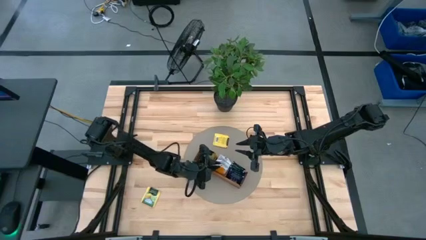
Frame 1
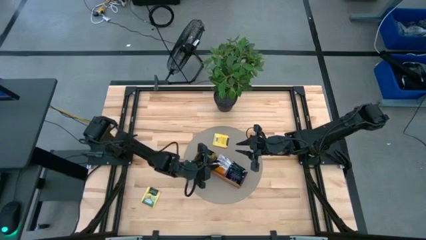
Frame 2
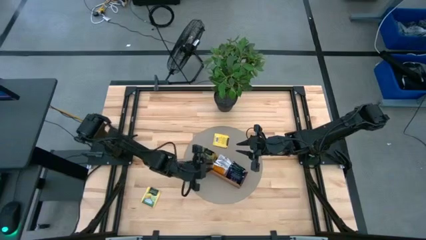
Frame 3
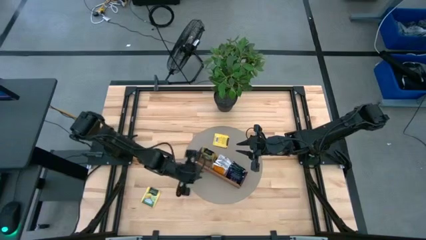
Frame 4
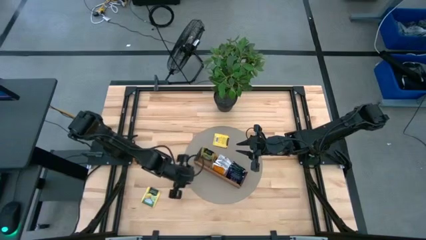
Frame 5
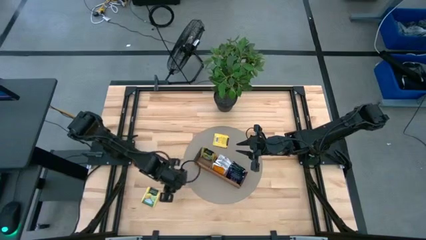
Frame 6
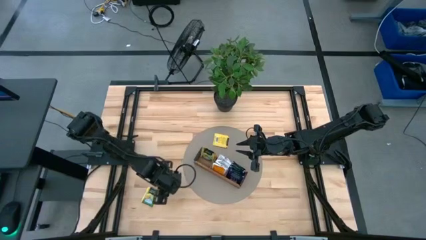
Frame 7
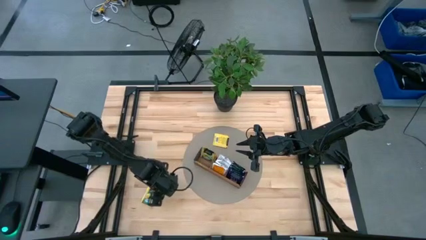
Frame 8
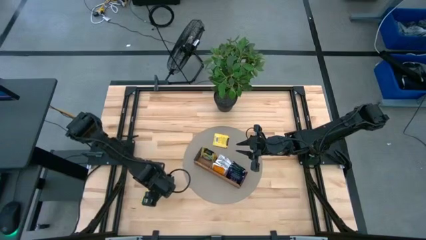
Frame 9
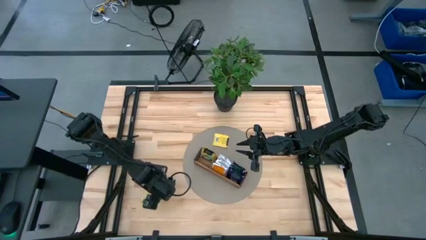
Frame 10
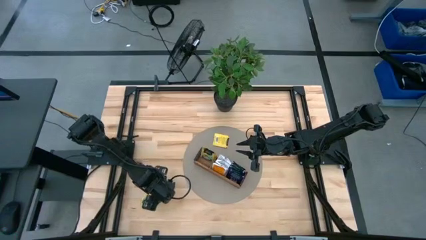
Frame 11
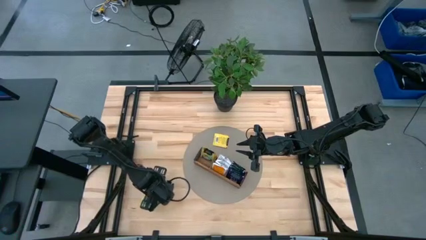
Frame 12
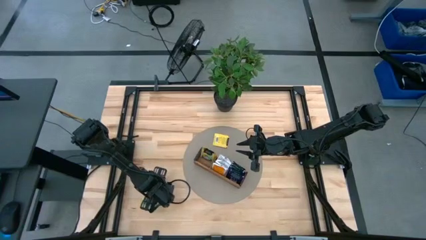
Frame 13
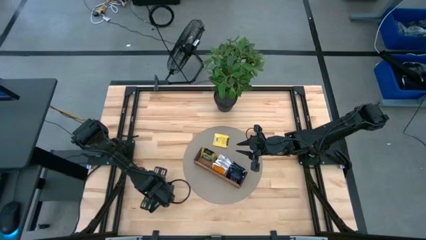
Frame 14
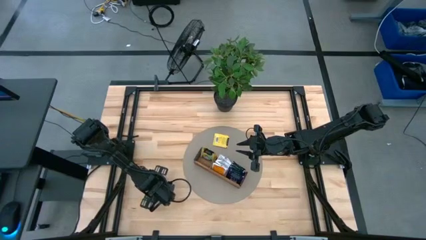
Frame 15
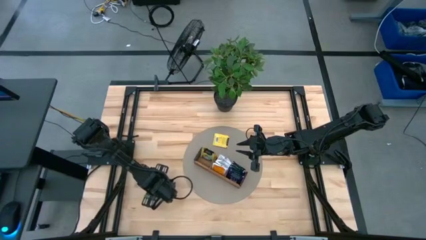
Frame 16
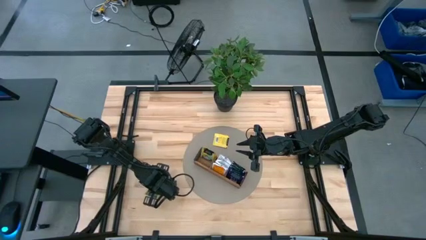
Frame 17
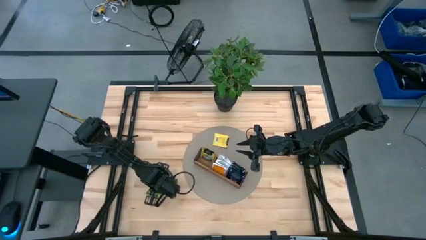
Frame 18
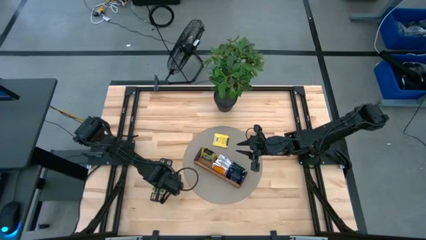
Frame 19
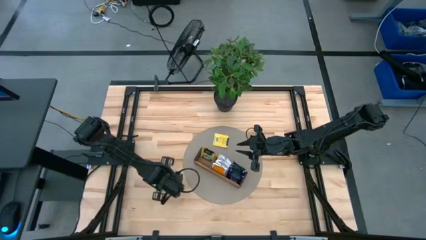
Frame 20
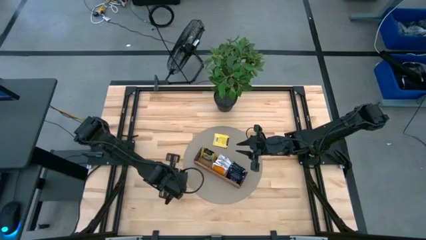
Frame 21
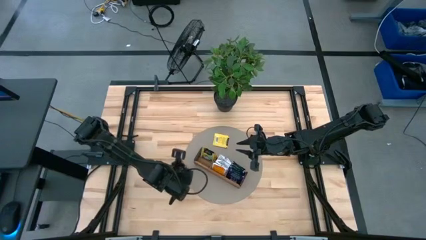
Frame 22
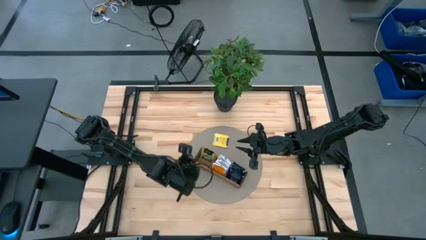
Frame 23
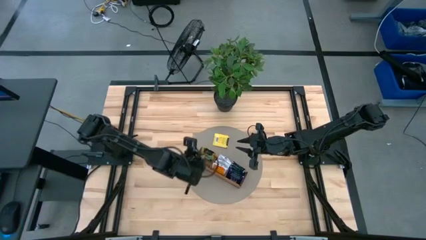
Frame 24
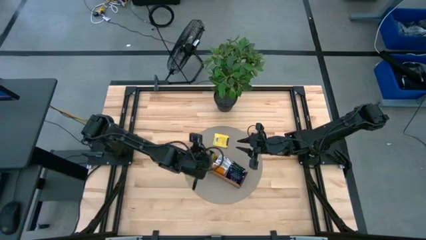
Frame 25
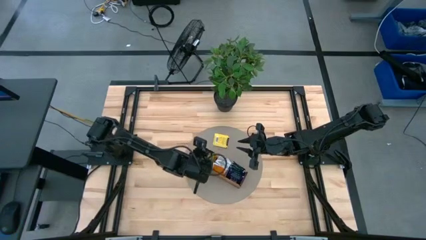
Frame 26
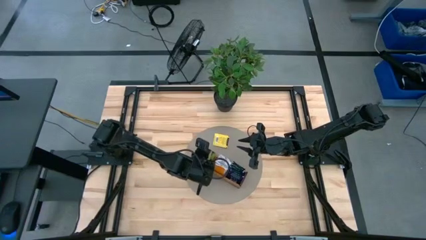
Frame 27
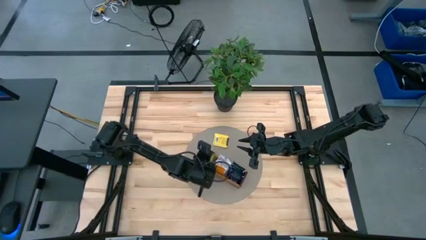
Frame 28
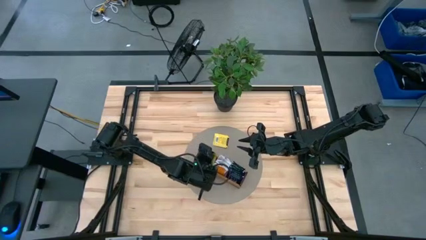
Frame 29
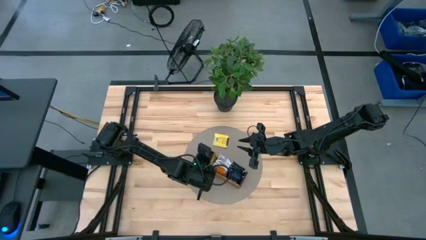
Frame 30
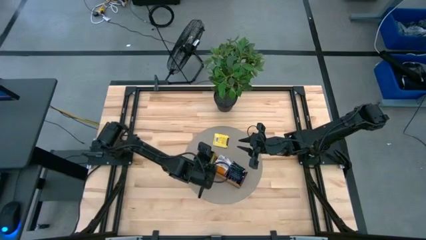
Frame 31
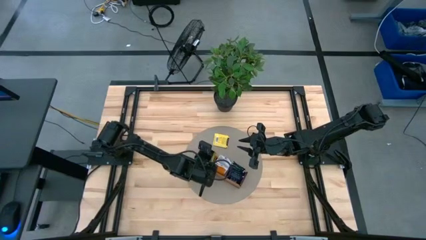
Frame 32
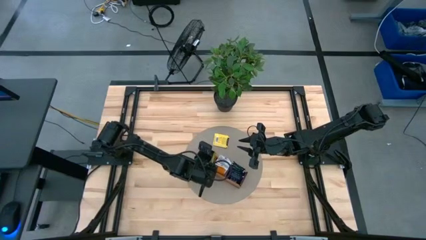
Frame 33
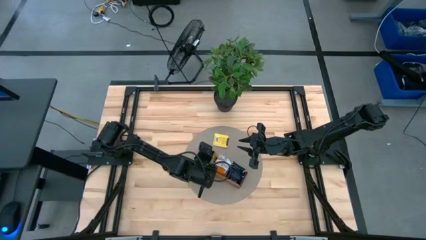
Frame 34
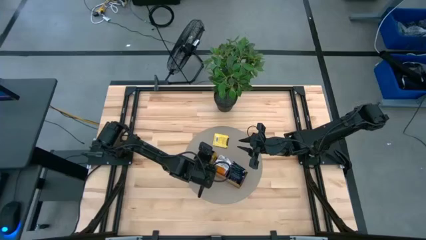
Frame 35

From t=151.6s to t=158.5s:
Task: Pick & Place Tea
Put the yellow tea bag into the left section of the wooden organizer

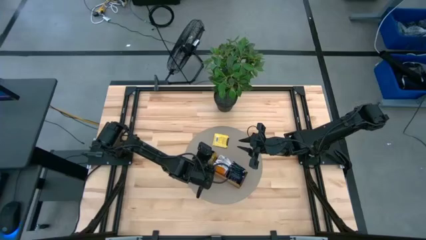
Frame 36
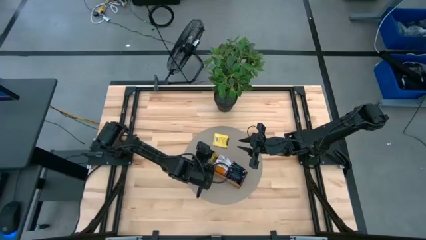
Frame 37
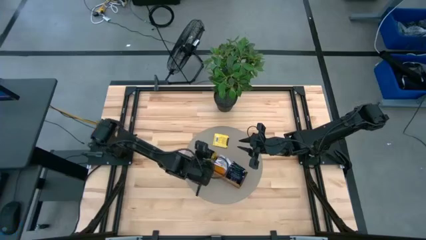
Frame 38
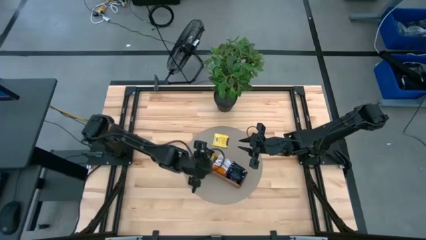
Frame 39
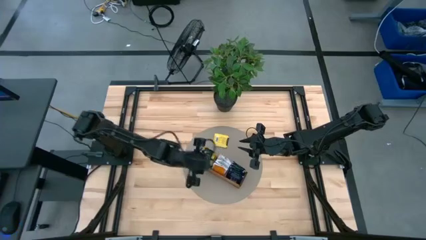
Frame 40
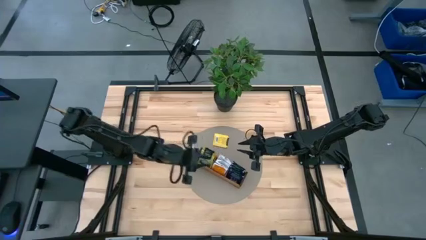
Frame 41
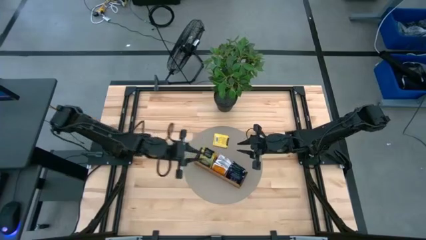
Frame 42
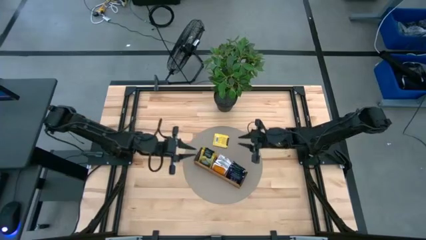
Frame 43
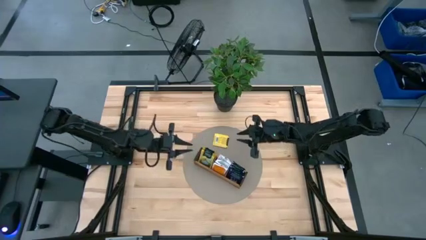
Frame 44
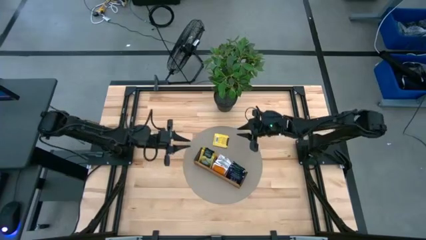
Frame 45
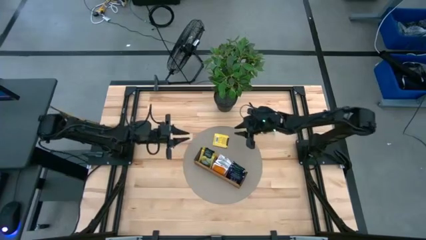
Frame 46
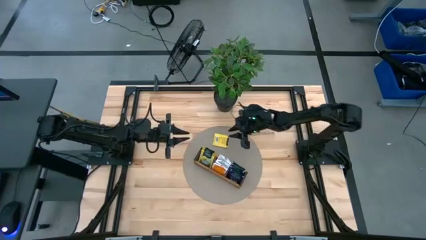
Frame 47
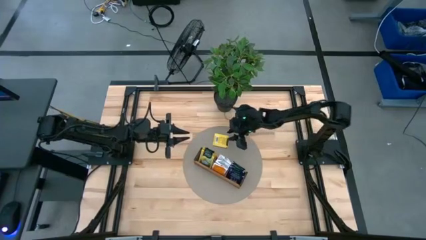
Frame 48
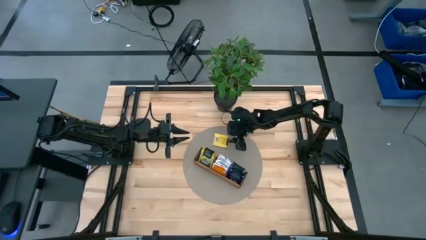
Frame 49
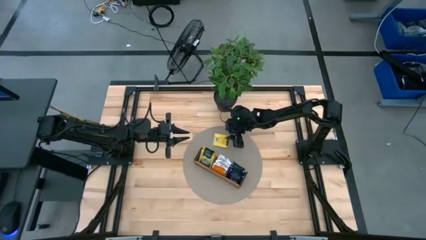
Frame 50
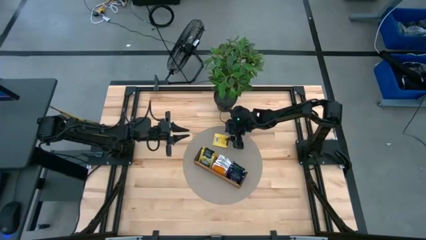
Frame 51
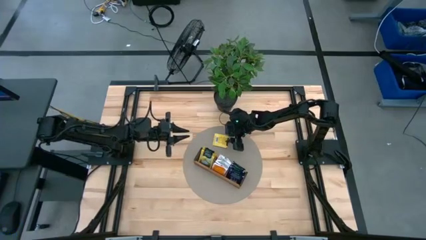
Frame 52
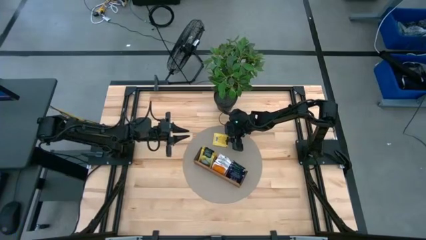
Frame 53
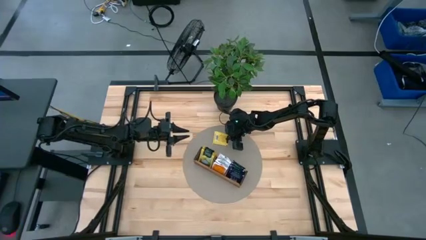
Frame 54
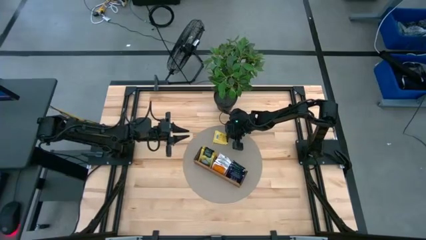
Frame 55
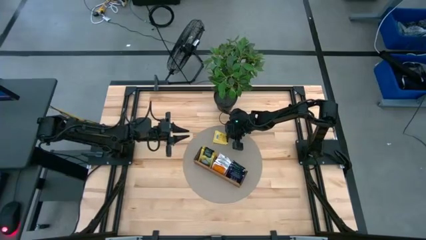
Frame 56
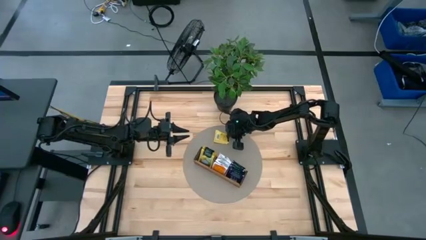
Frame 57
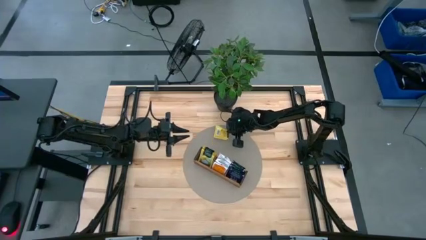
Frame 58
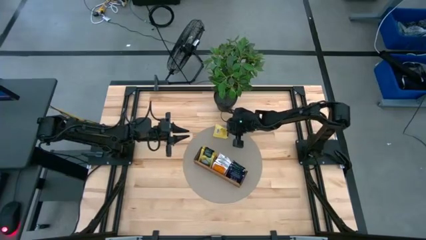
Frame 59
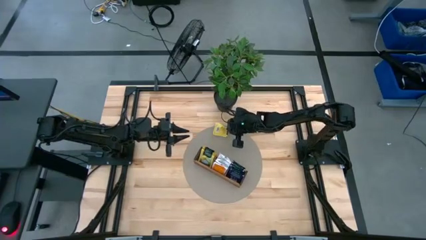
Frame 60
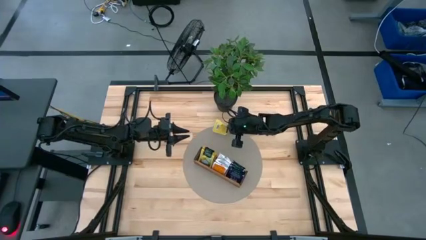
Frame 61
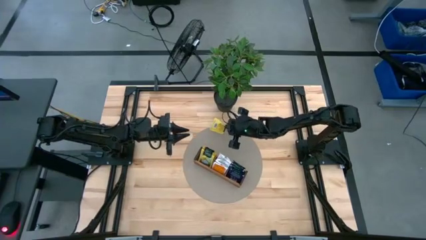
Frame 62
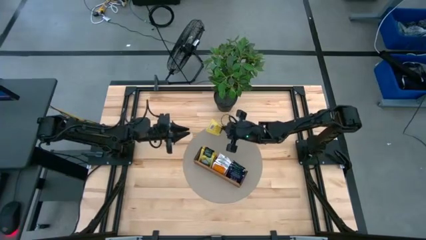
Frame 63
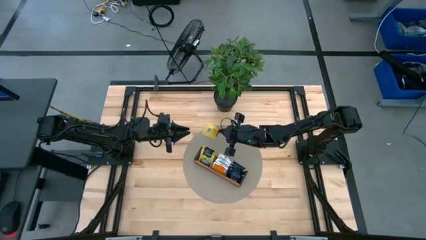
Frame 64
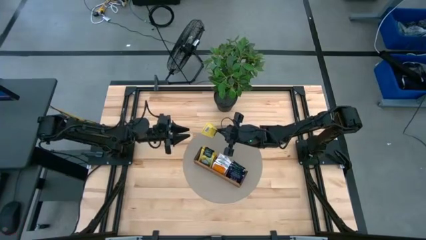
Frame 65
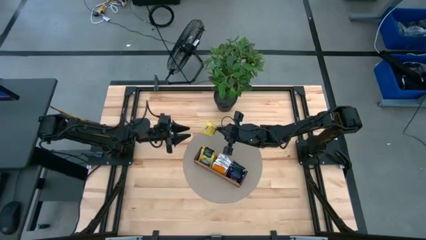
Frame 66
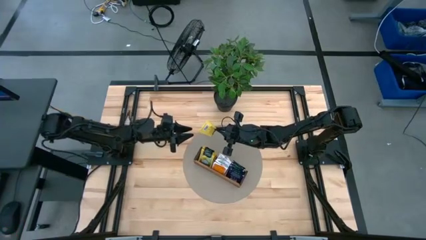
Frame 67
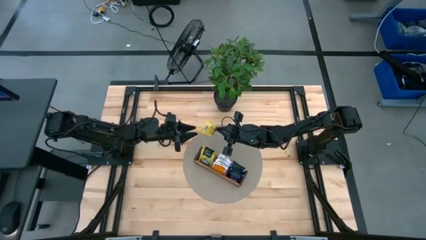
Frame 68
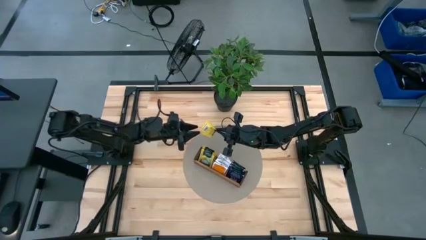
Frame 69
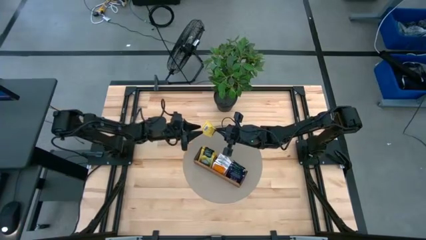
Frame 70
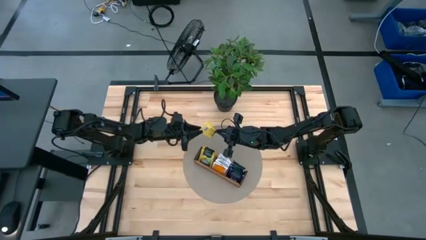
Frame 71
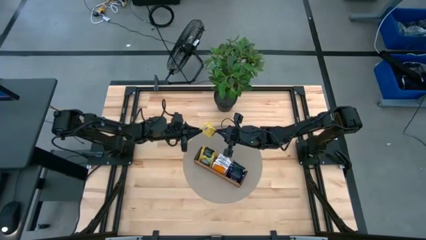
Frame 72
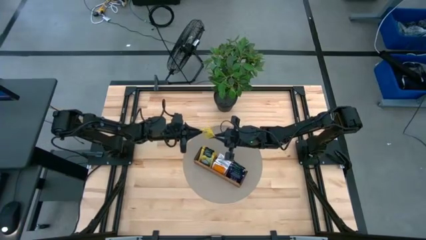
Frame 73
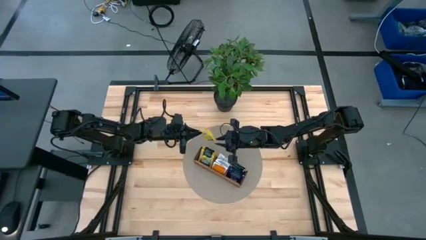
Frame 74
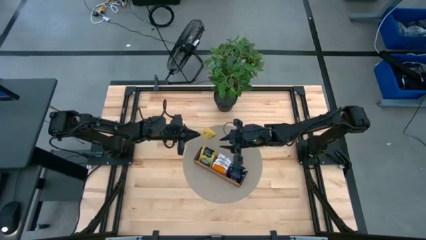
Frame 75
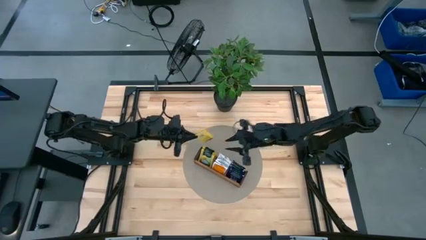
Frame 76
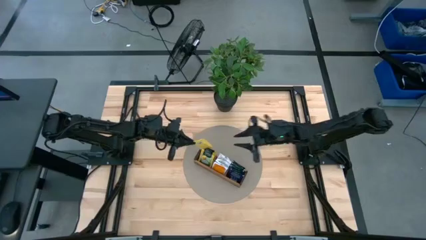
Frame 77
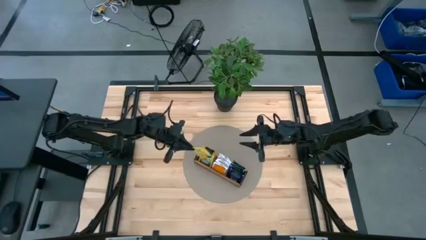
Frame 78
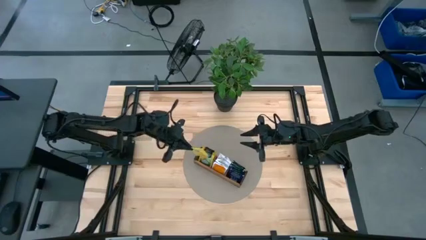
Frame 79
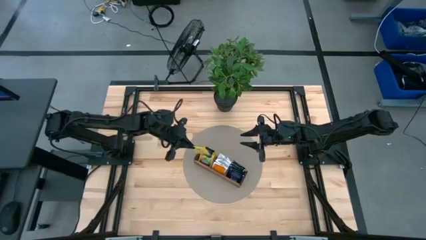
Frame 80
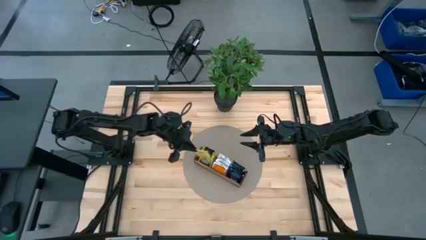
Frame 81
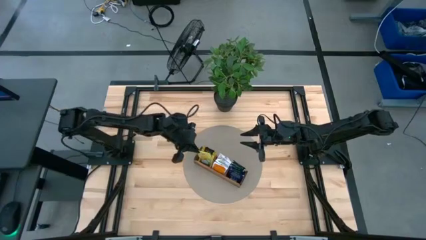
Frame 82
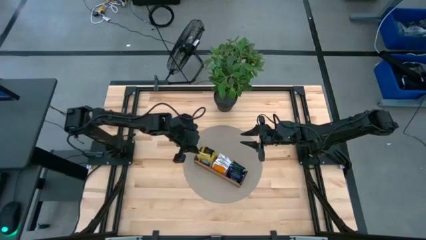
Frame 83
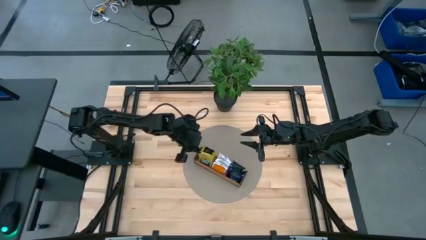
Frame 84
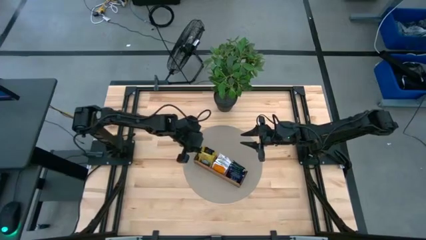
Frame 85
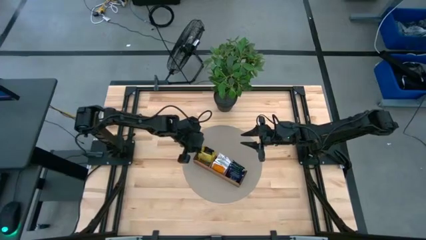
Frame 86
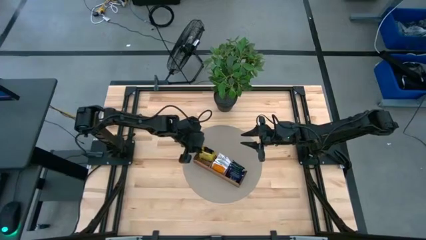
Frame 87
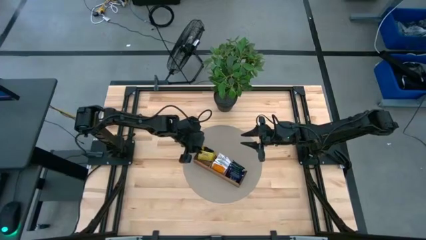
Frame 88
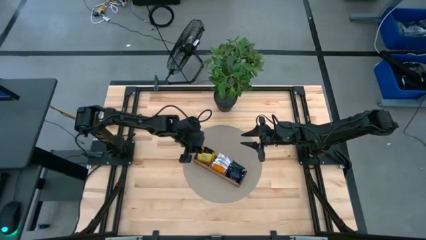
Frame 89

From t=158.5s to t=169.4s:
Put the yellow tea bag into the left section of the wooden organizer
